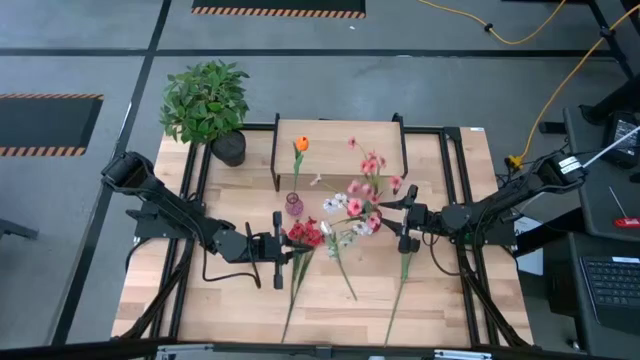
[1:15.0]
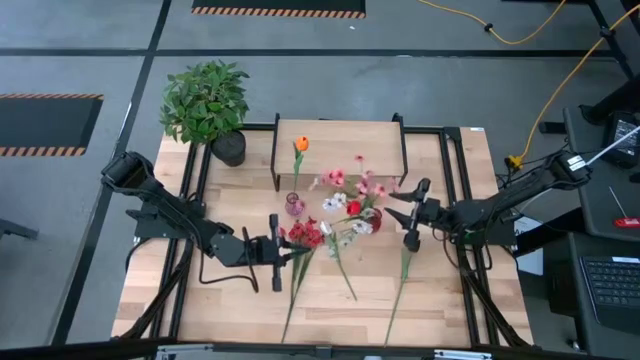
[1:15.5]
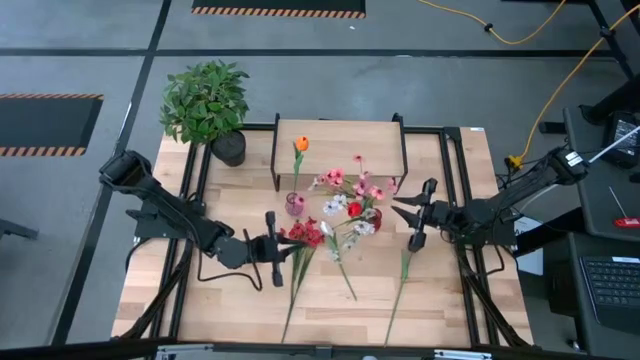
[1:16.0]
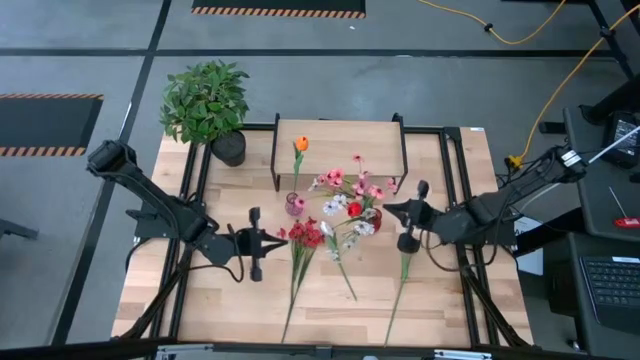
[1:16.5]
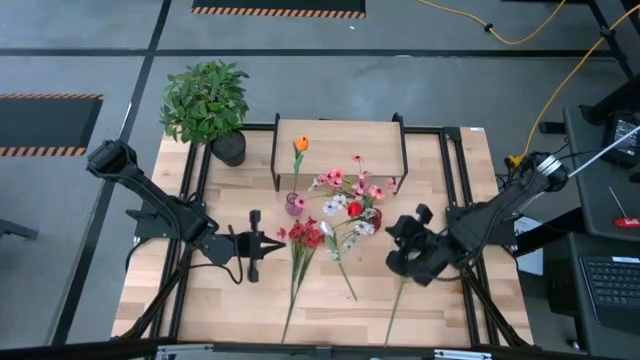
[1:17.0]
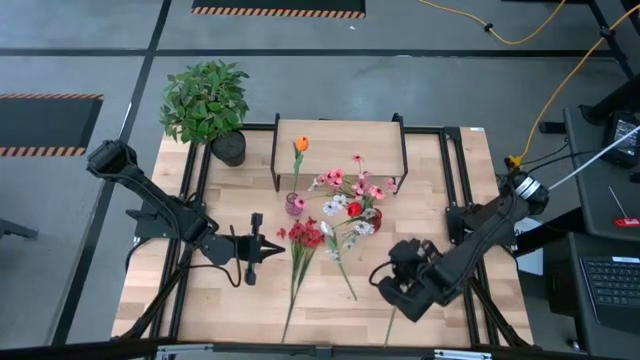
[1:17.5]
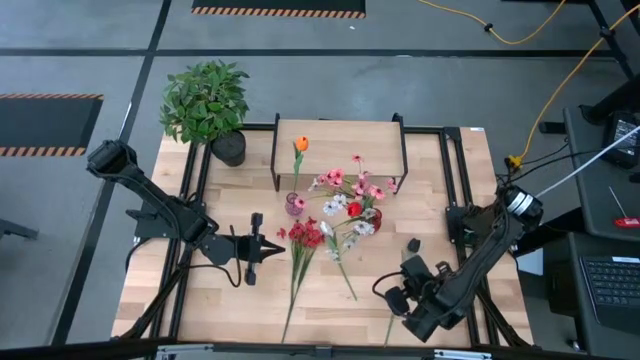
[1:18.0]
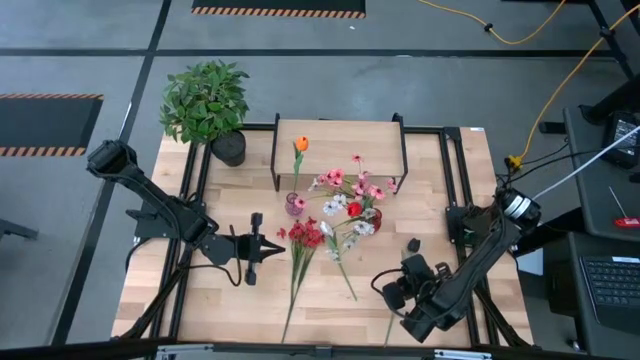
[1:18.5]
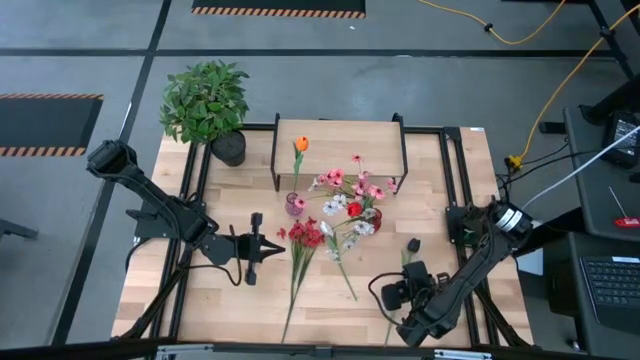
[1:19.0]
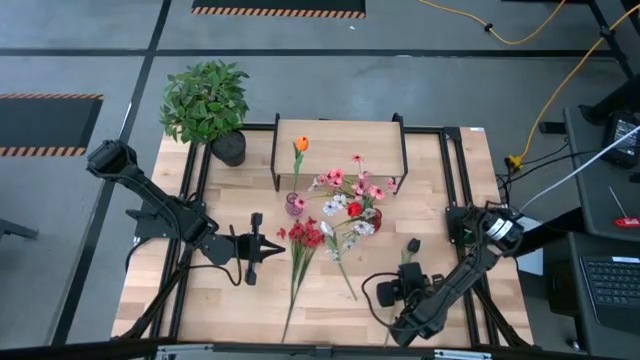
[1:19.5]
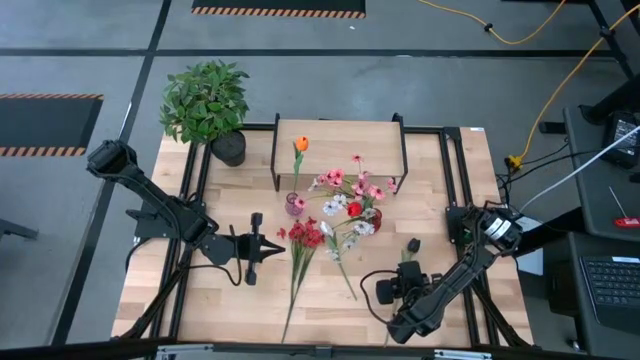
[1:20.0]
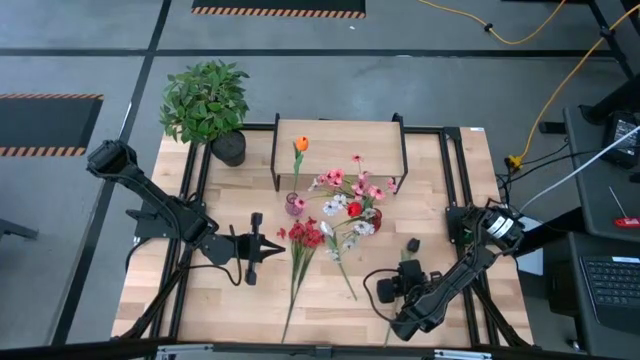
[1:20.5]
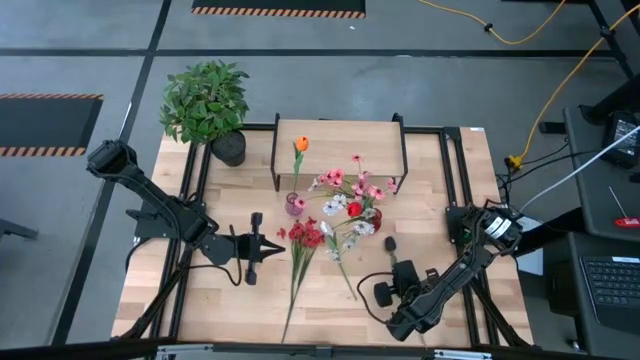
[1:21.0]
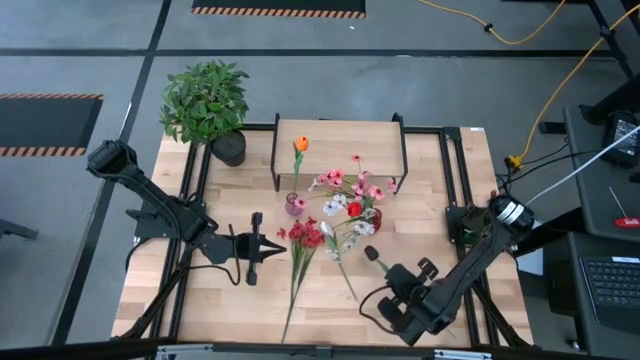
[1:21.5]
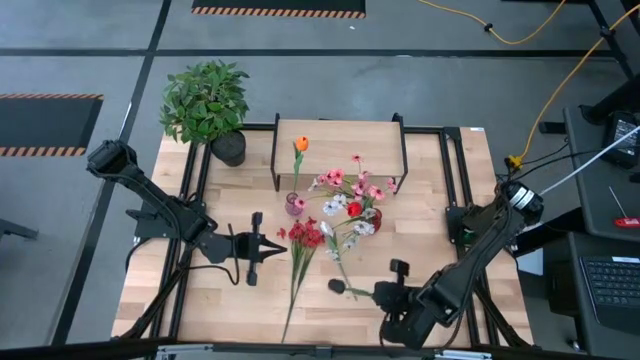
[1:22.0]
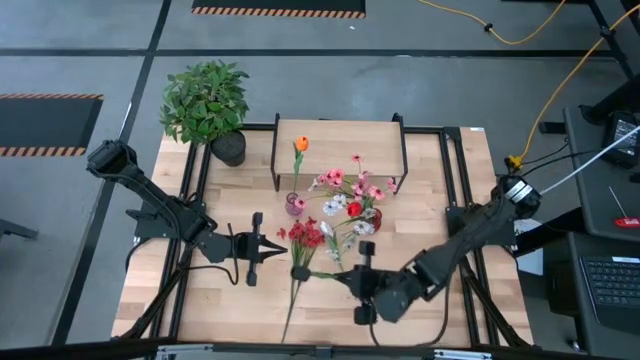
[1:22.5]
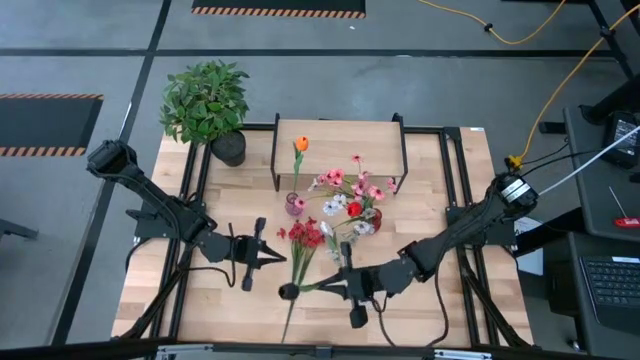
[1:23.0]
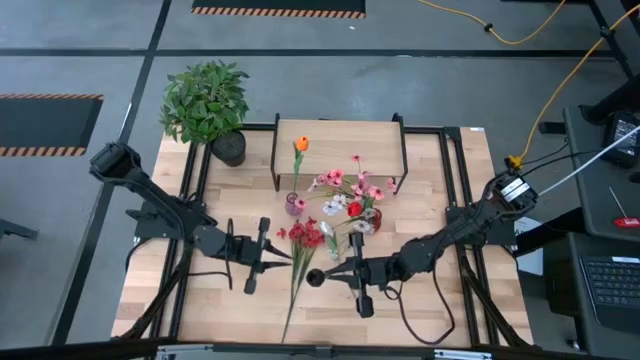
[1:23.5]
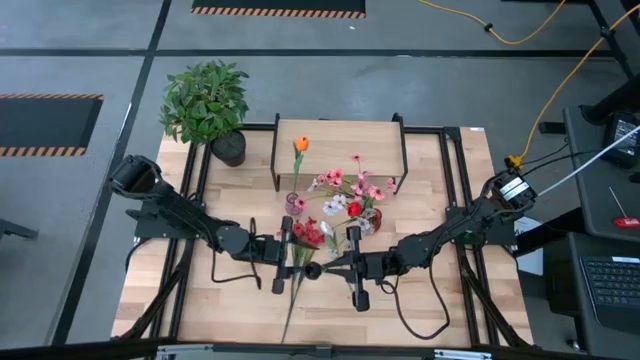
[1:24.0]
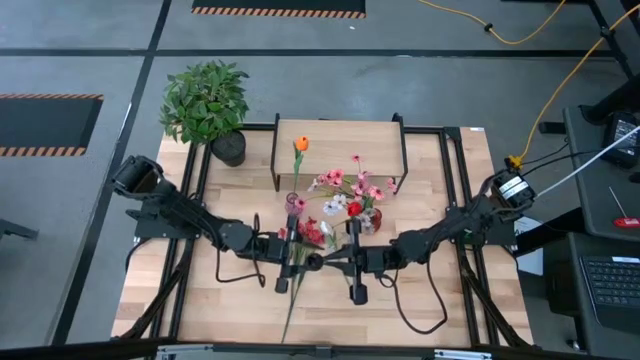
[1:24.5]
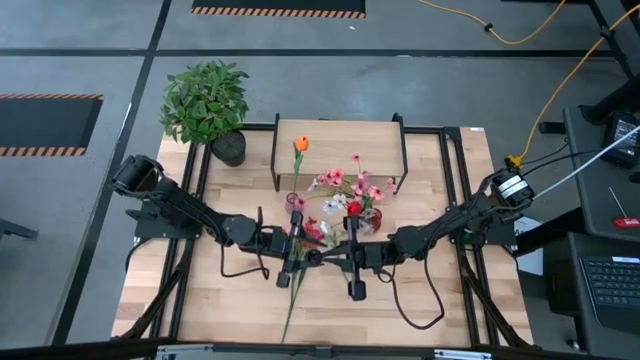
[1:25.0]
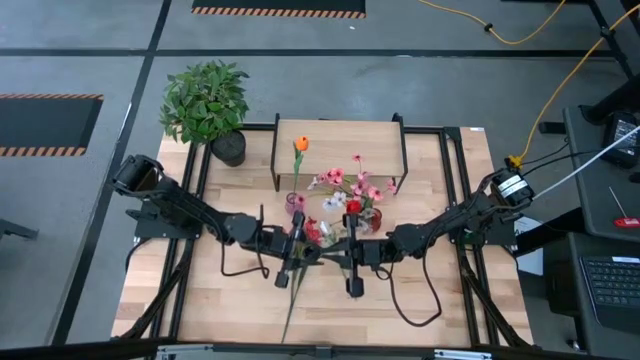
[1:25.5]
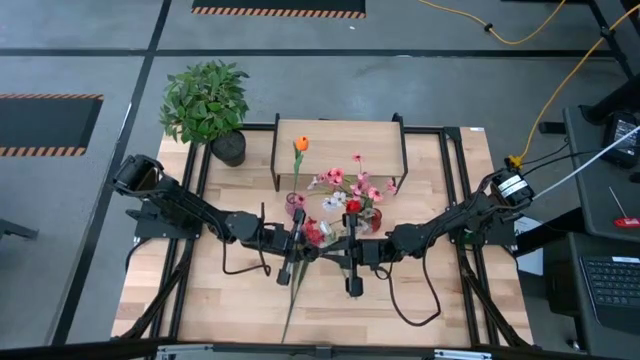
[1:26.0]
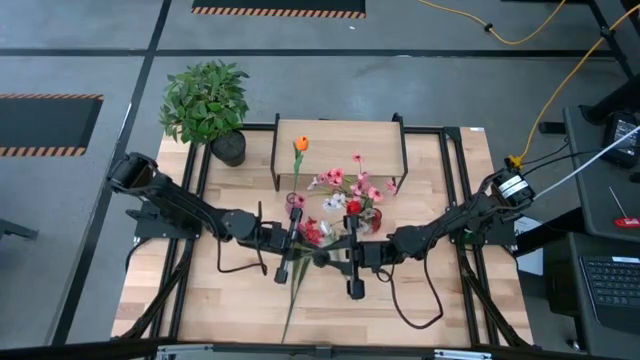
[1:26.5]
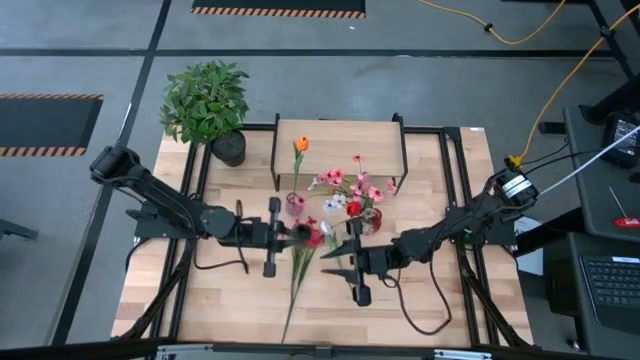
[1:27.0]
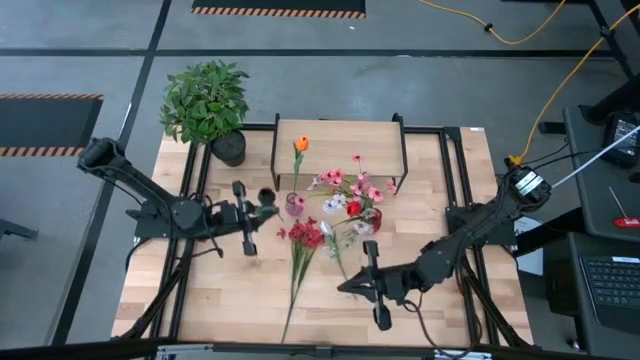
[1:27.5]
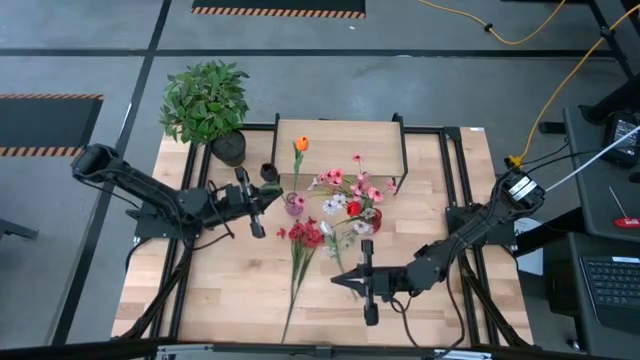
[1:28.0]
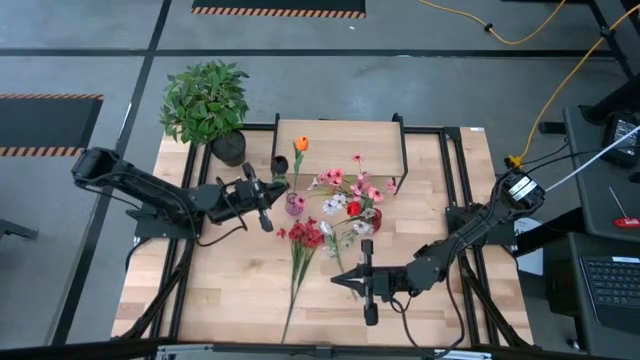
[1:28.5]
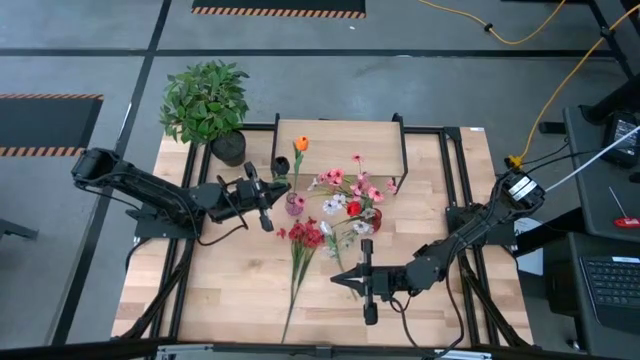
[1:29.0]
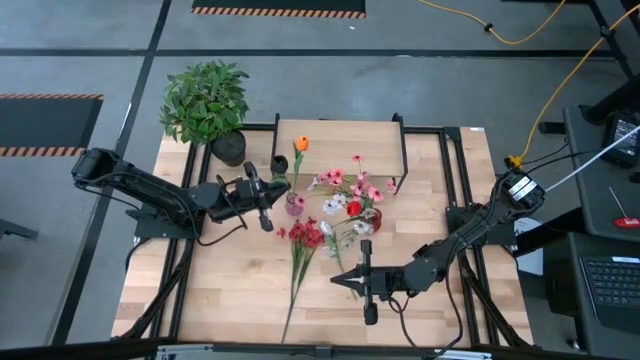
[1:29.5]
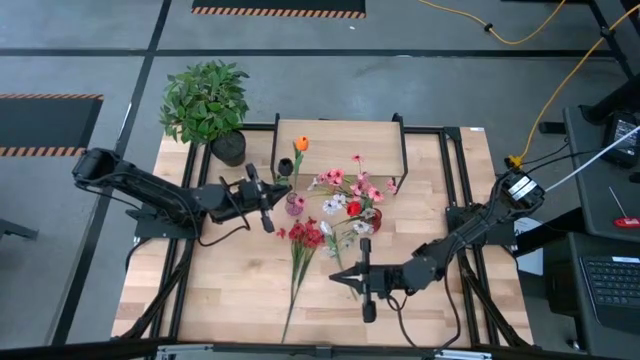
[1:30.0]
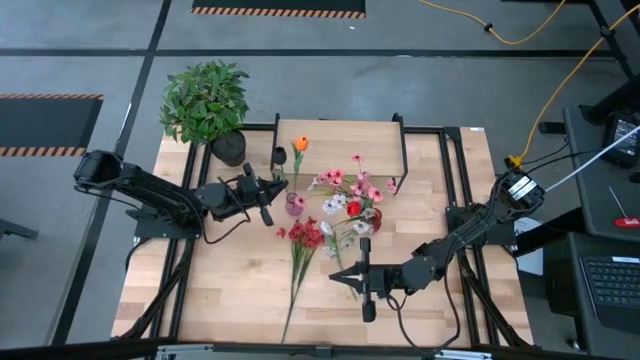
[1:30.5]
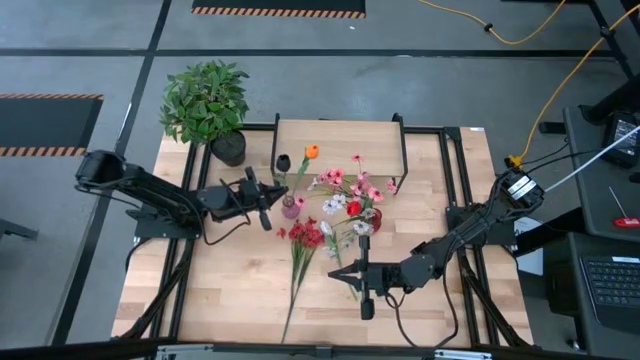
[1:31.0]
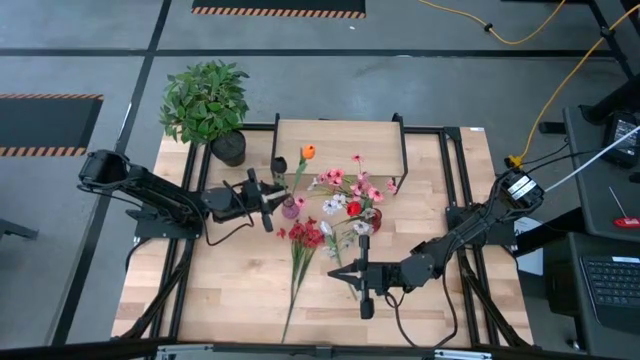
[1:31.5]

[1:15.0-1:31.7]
Task: Pick and place flowers into a vace then onto a shelf
Put the black tulip into the purple vase

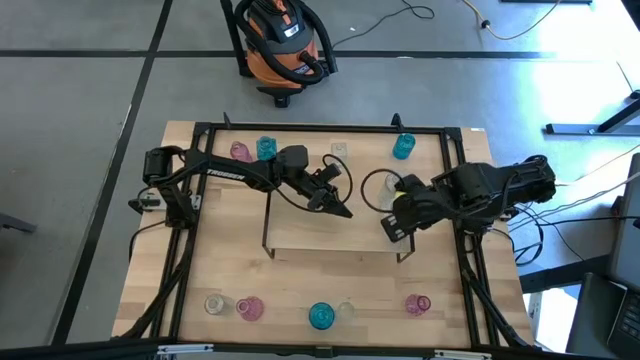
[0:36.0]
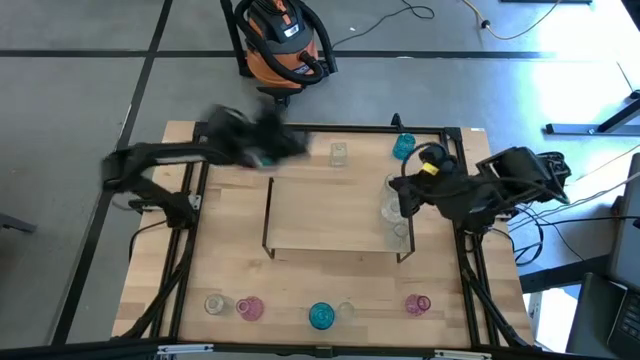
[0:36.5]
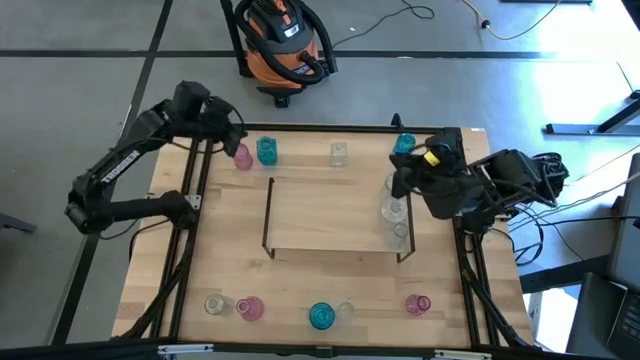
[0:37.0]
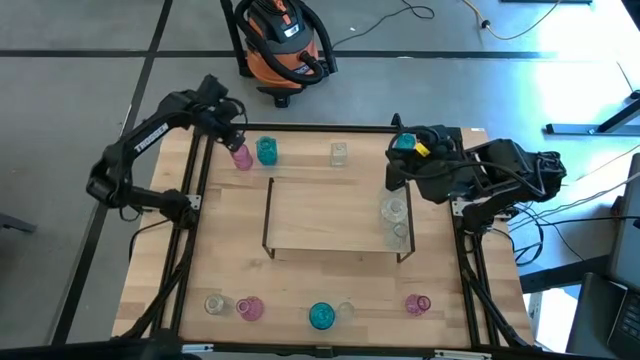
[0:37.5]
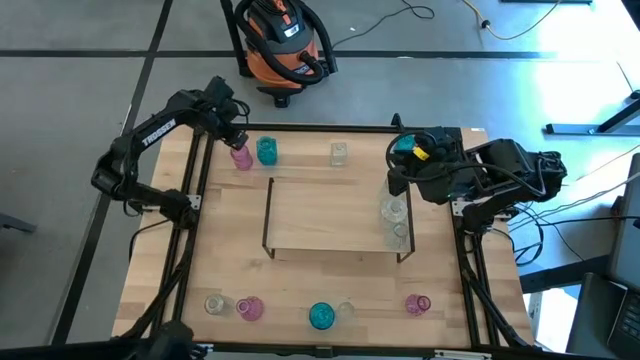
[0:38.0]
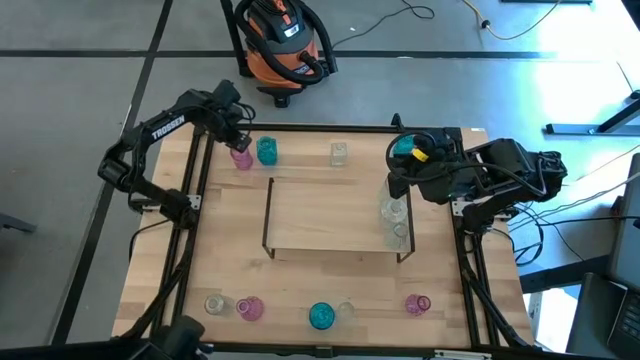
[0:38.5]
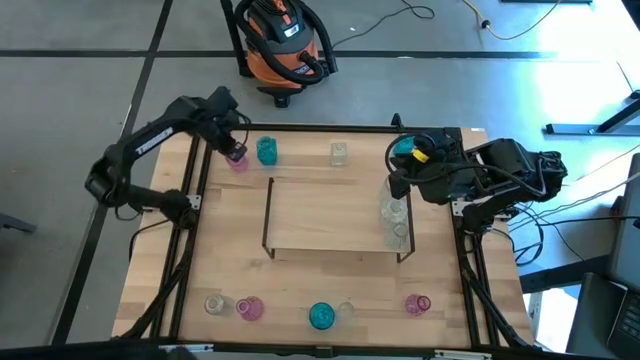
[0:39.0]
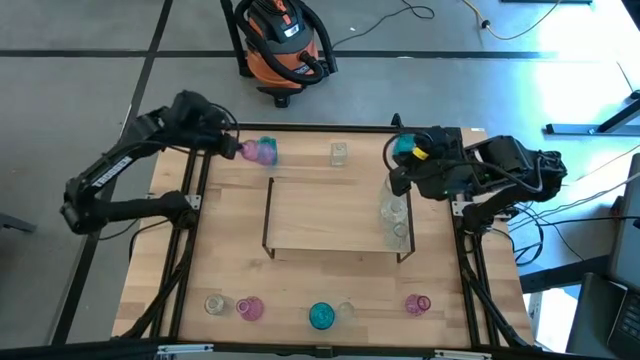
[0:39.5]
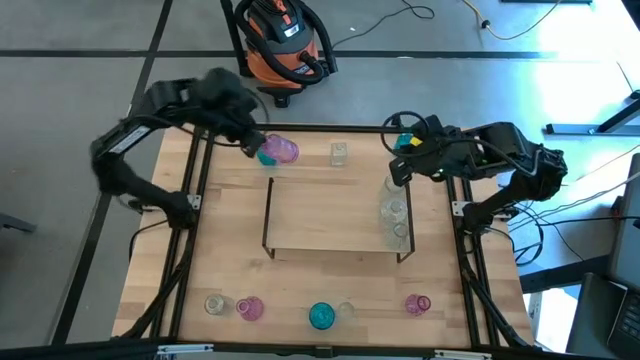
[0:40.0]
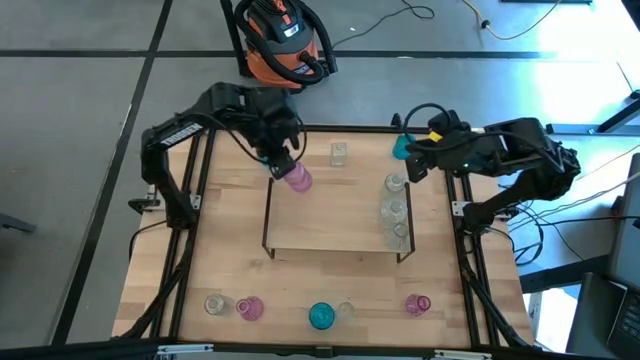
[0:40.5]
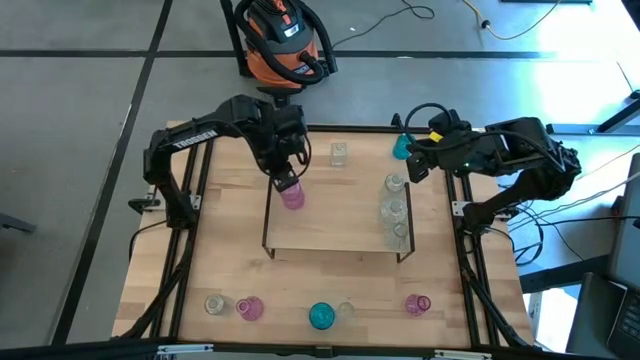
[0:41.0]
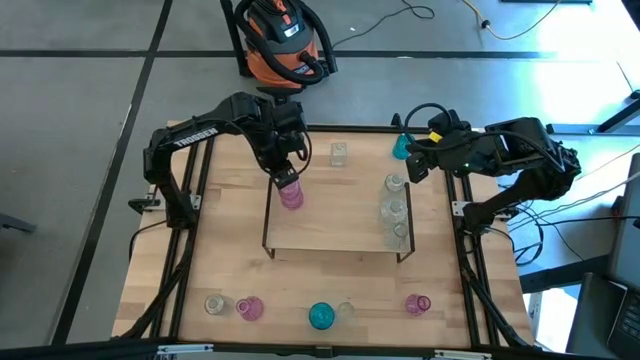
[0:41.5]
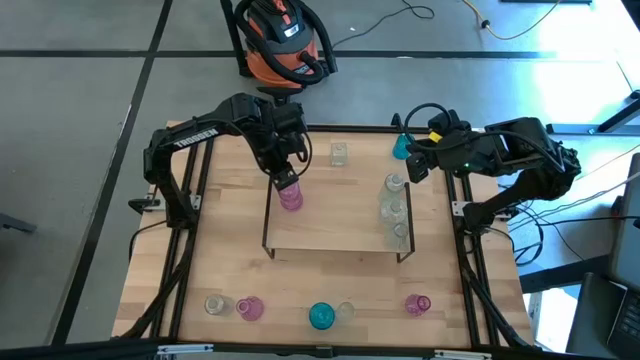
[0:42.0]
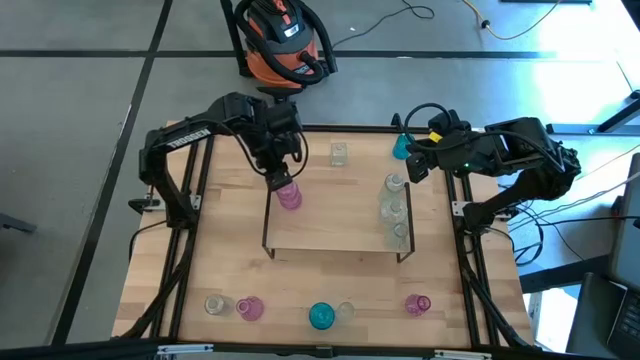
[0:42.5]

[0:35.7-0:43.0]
Task: sort vases onto shelf
Put the violet vase on the shelf
